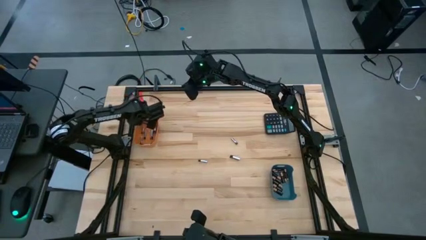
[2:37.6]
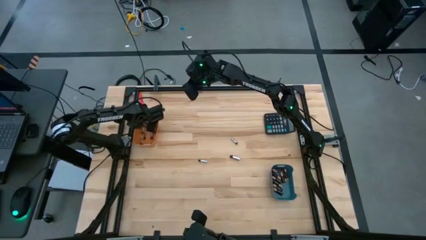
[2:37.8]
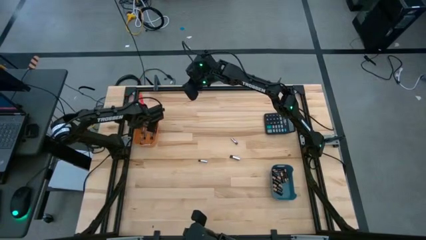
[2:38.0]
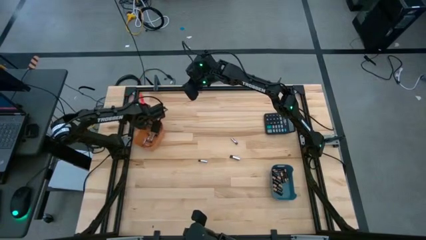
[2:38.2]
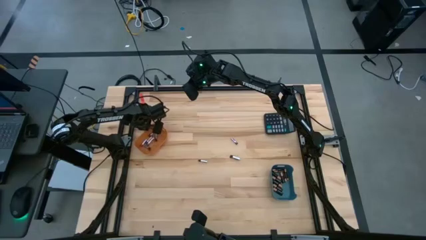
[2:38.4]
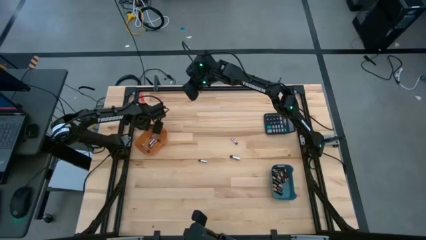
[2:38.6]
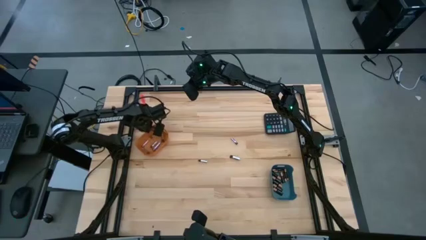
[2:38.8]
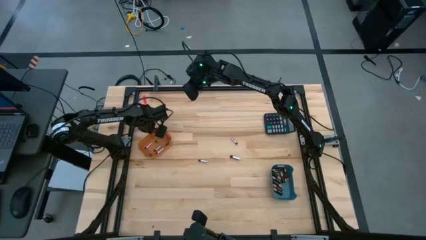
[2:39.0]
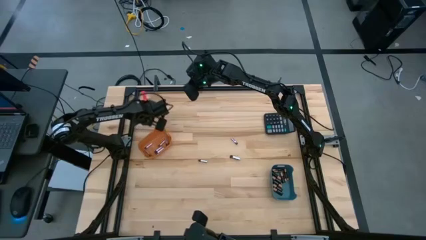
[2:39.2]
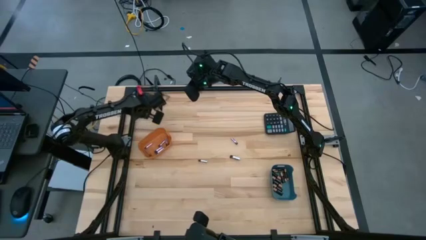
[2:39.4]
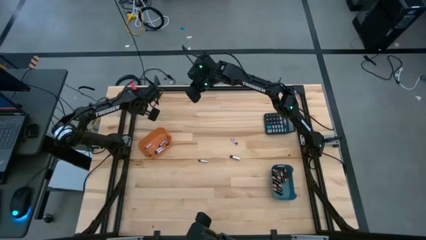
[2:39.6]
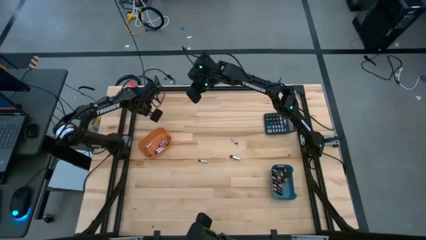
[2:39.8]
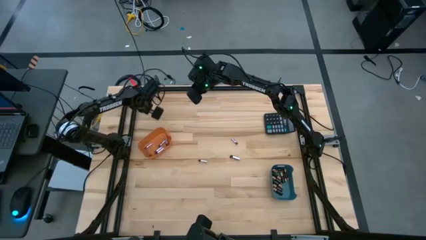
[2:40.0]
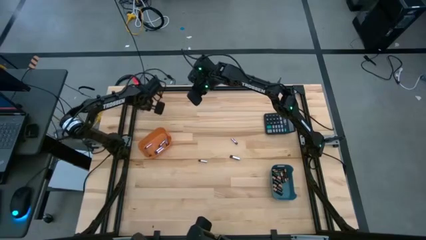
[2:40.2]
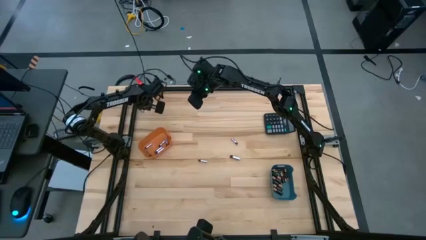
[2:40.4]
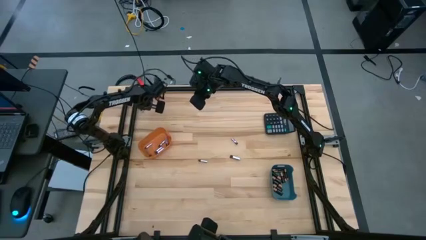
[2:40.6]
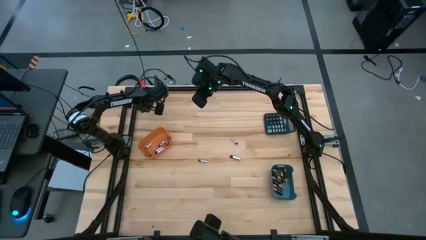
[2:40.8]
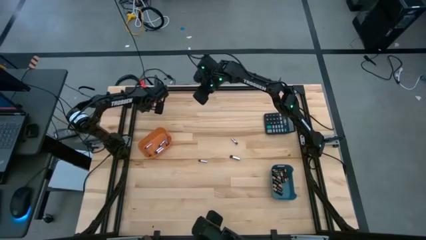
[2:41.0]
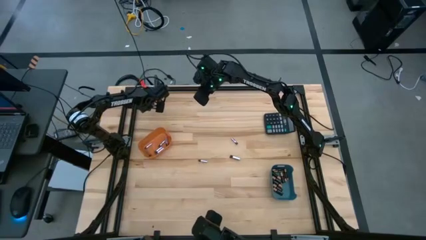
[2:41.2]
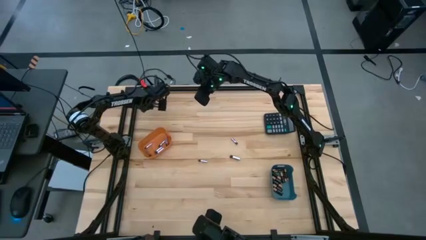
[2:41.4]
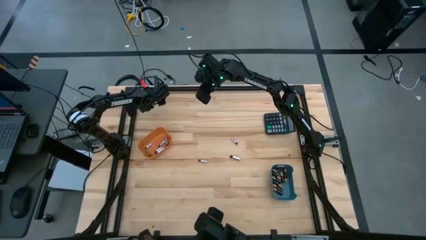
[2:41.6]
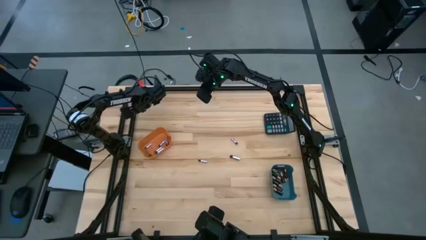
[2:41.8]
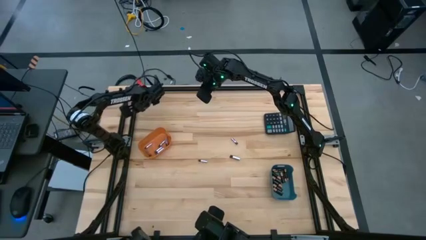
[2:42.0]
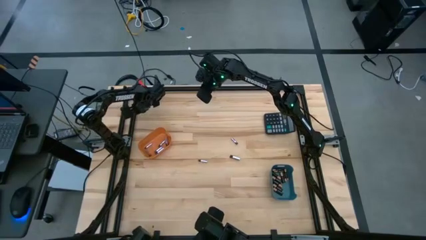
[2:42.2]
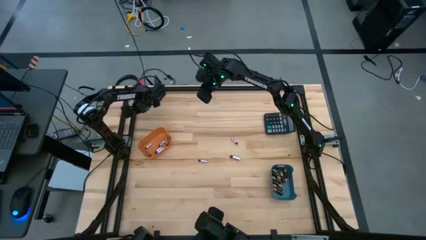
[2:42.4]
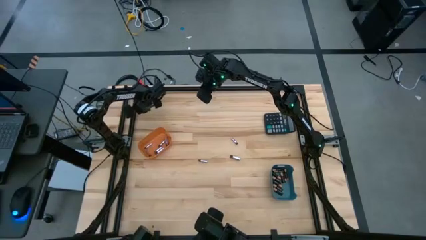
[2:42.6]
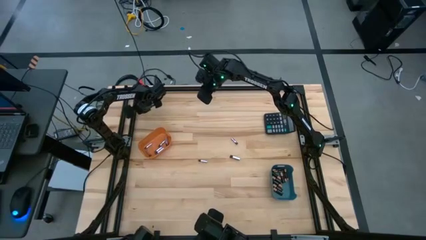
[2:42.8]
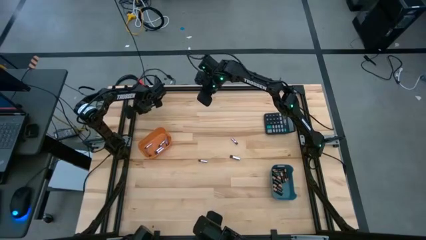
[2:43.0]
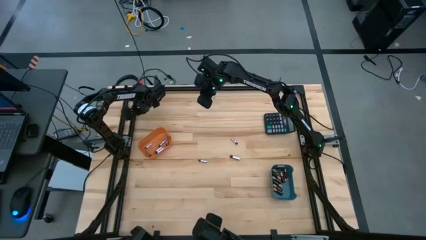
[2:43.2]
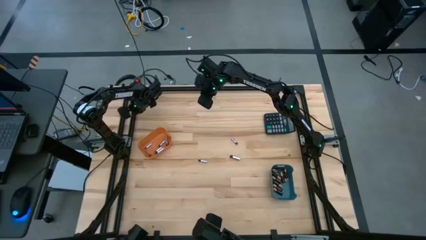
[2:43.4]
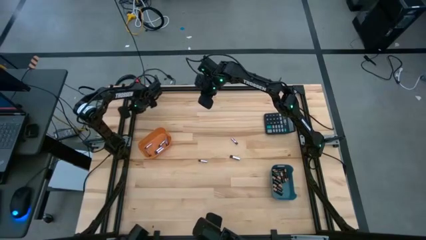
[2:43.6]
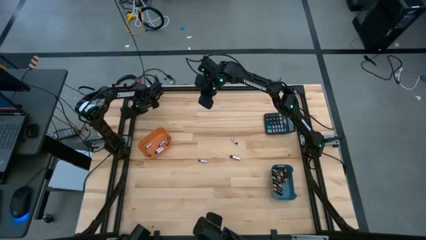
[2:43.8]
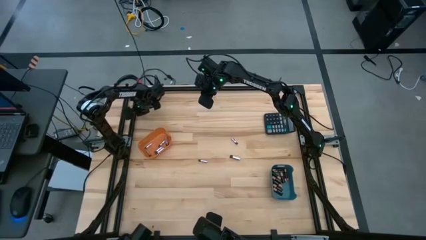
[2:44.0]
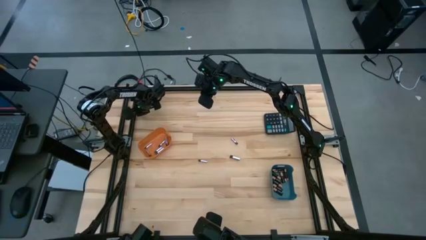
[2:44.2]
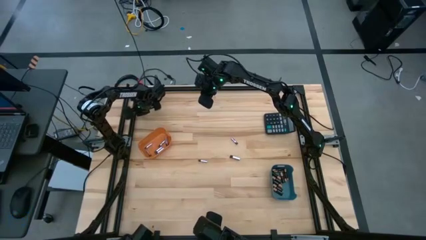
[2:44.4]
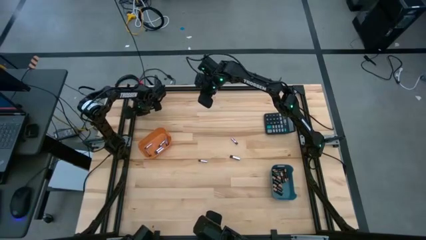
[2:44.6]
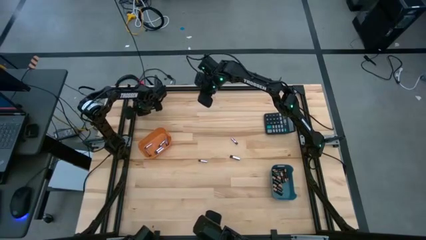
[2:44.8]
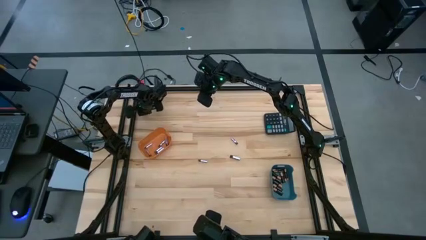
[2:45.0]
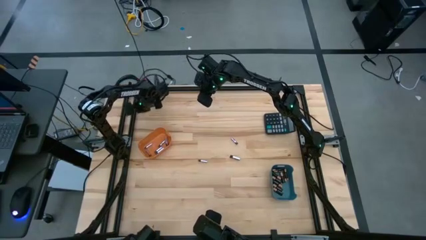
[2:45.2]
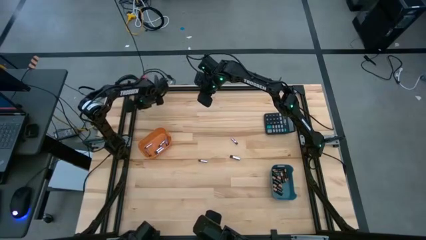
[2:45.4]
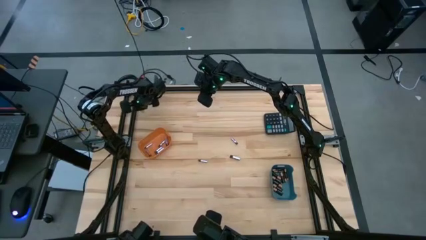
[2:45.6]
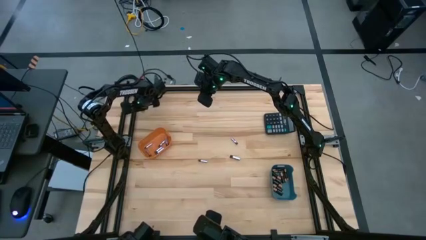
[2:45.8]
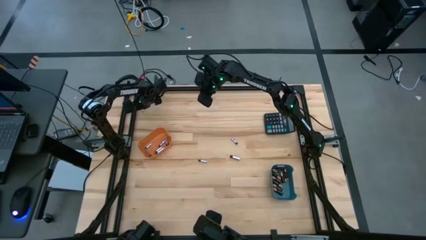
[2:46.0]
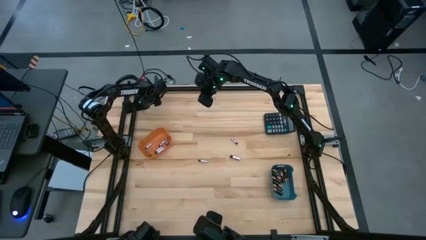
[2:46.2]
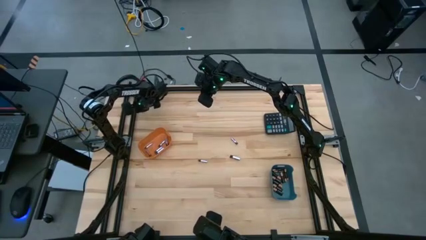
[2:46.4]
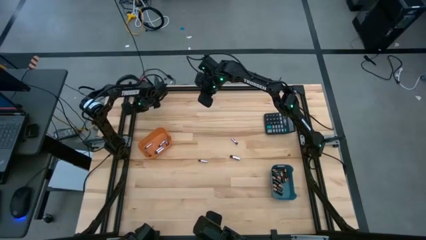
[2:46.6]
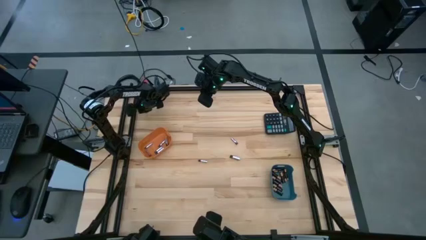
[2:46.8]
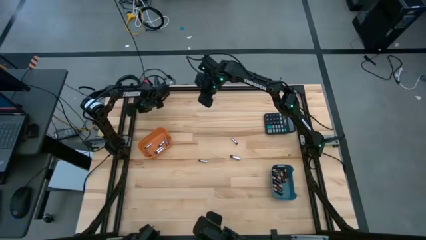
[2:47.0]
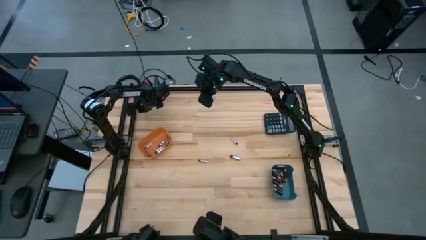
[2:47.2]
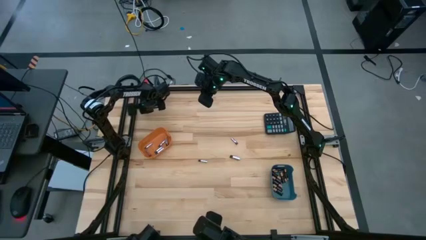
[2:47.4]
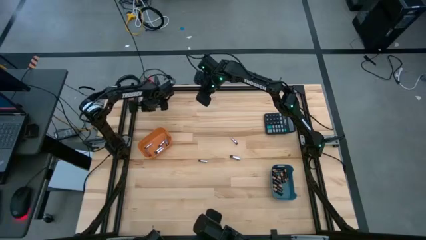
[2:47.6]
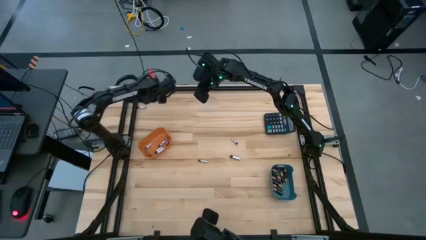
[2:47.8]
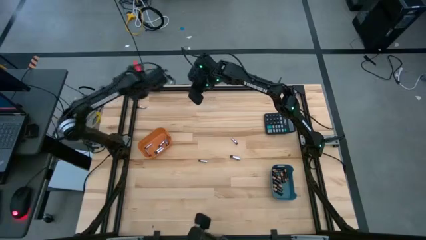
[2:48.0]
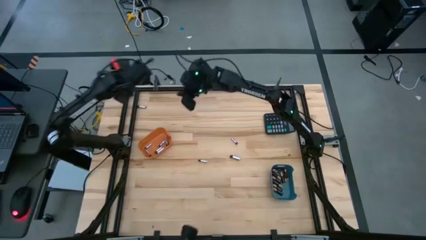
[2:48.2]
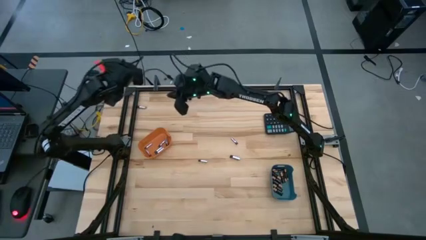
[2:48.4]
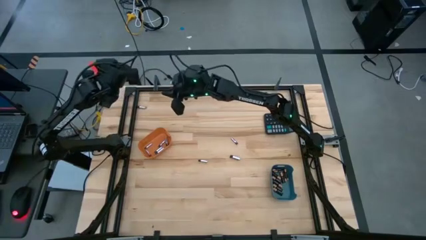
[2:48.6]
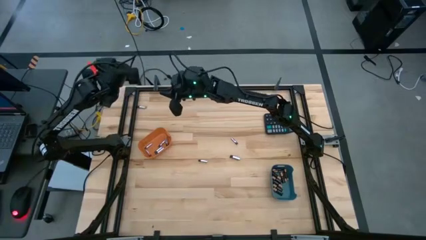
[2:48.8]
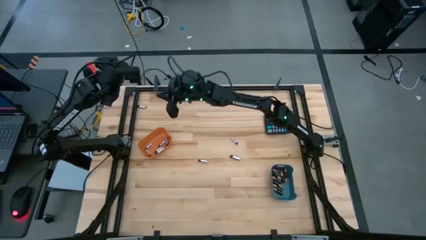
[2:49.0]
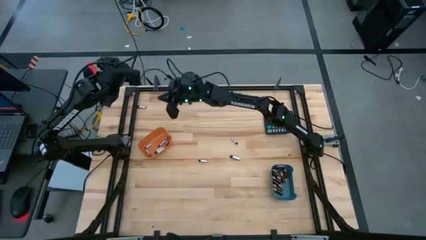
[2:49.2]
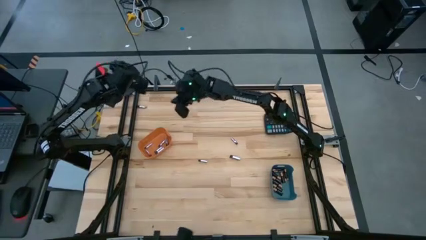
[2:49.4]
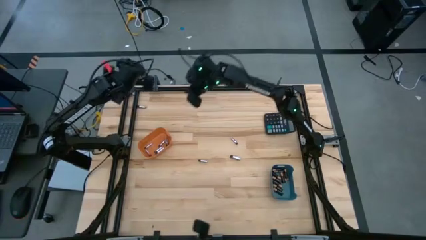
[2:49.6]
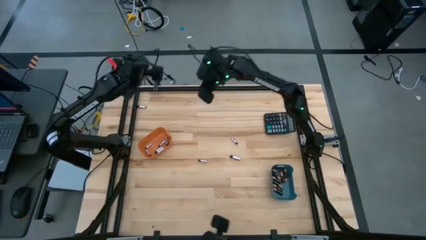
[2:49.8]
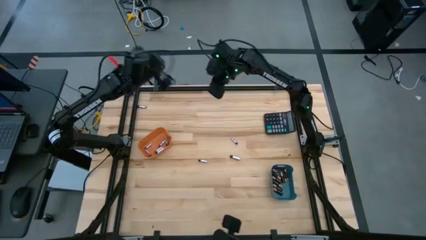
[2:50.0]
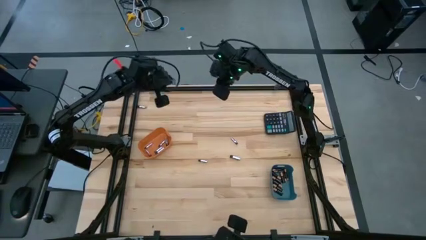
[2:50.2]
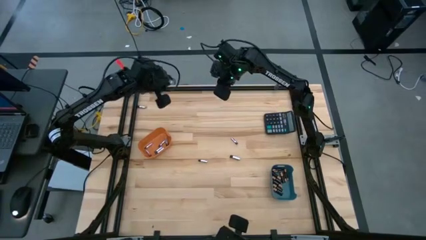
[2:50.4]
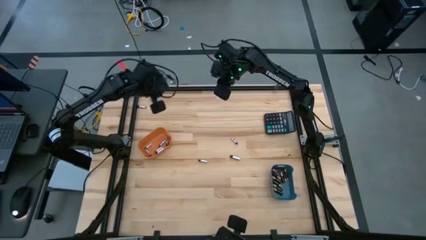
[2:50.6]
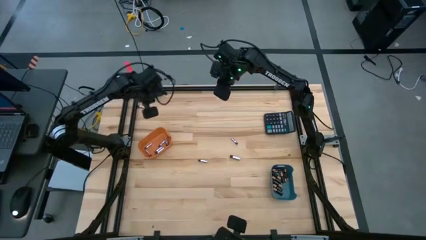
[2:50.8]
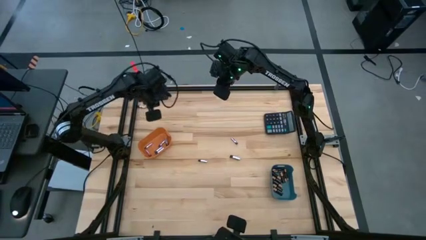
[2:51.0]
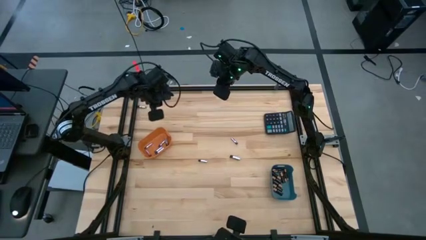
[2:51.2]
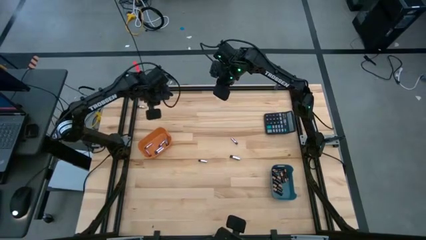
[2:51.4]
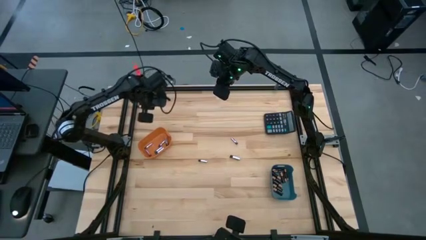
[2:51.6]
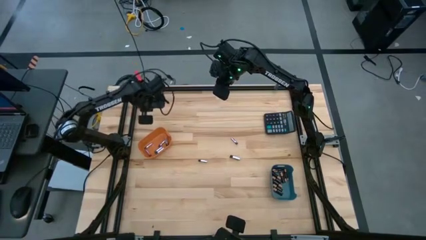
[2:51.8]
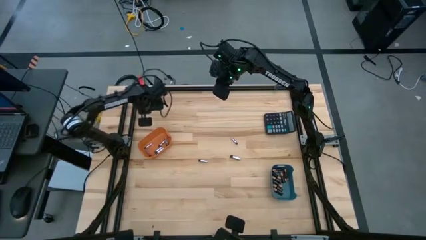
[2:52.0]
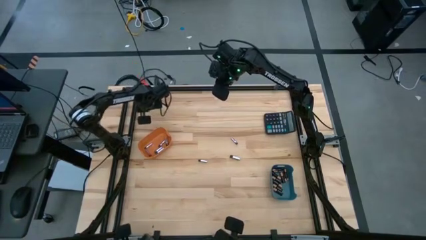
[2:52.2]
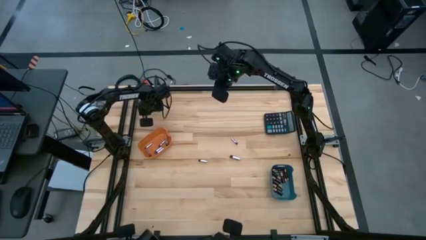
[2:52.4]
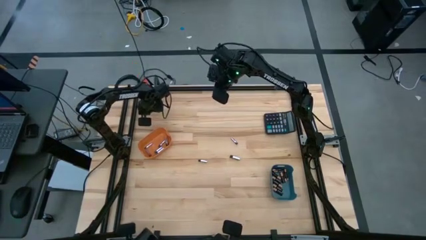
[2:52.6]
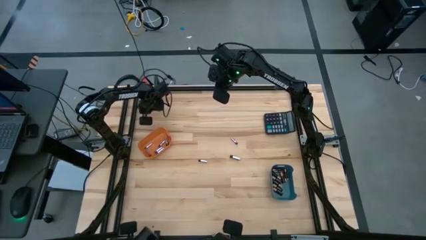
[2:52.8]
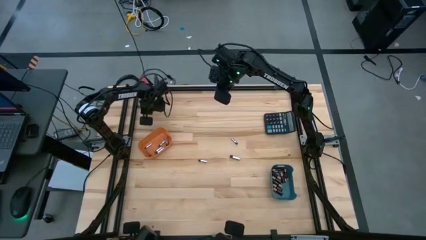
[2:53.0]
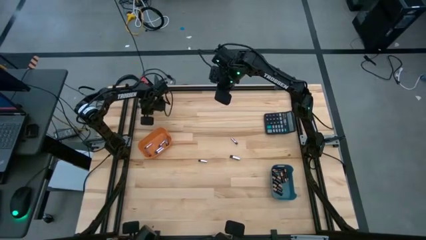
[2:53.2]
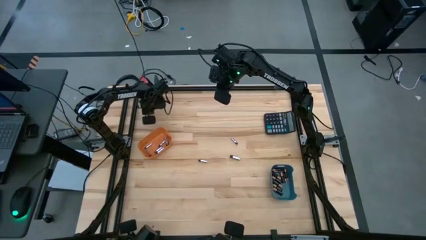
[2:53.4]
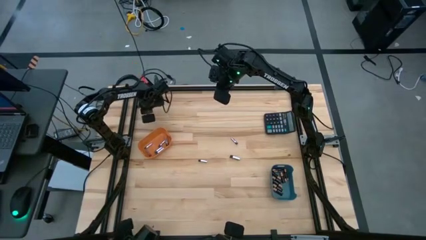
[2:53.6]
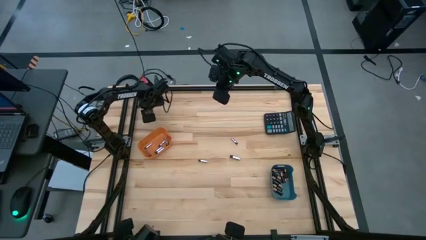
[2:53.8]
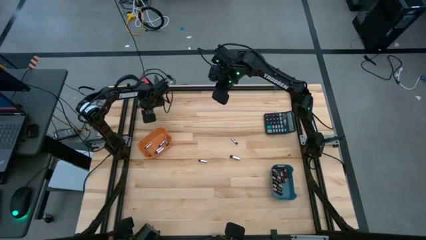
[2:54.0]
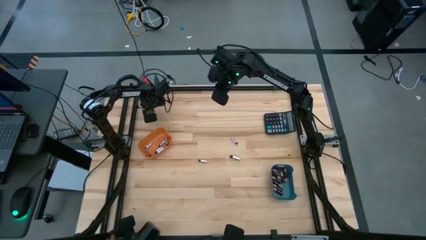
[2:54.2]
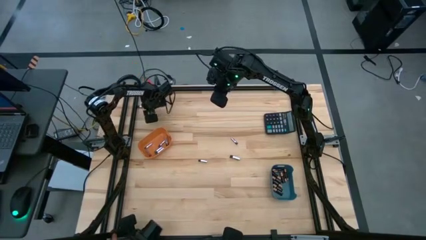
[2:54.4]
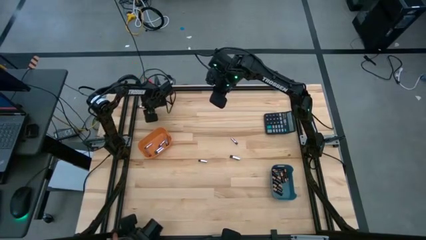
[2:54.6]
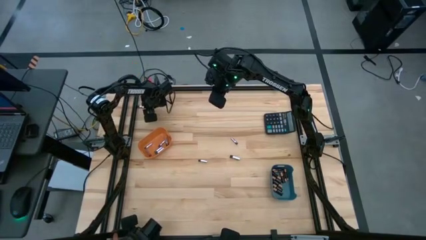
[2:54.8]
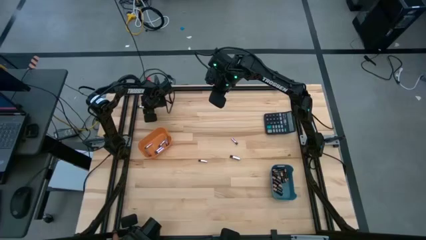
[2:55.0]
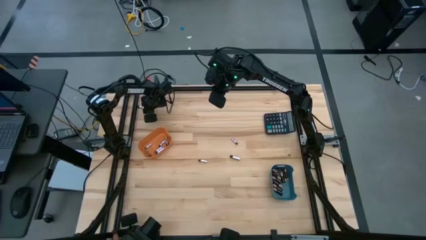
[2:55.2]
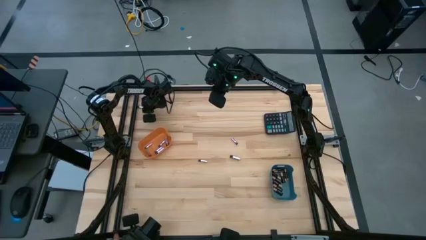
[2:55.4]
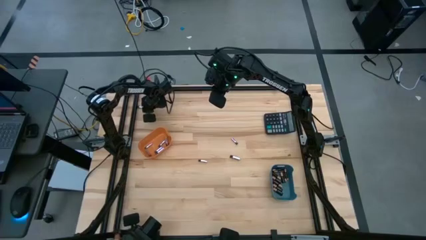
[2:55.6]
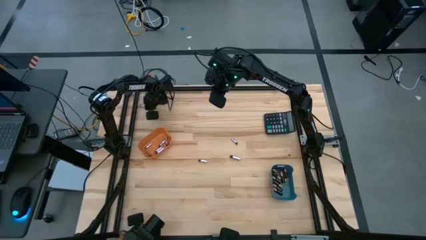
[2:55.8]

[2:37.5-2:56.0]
Task: Sort batteries
Put the silver battery into the orange bin
